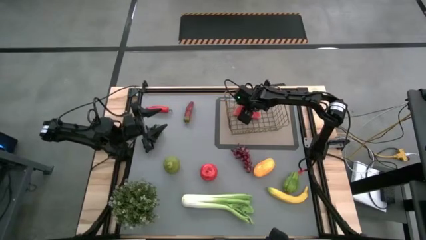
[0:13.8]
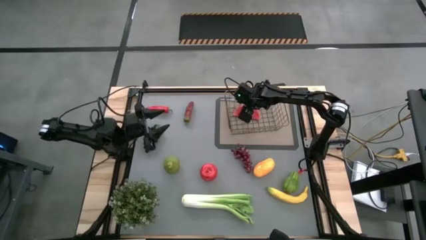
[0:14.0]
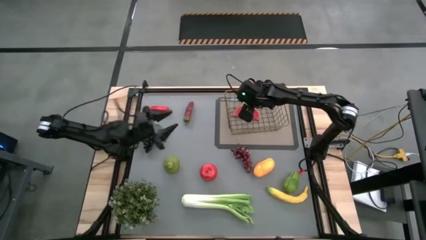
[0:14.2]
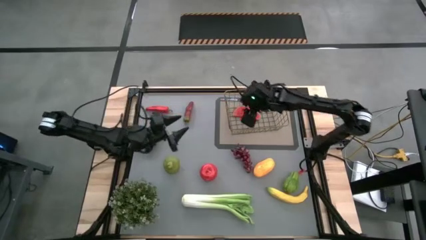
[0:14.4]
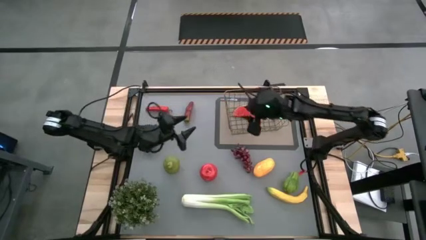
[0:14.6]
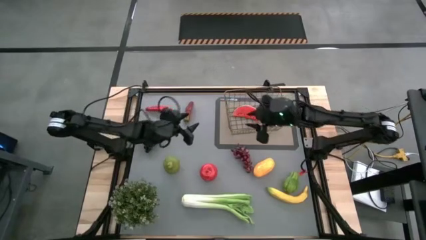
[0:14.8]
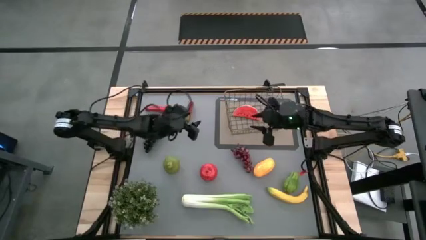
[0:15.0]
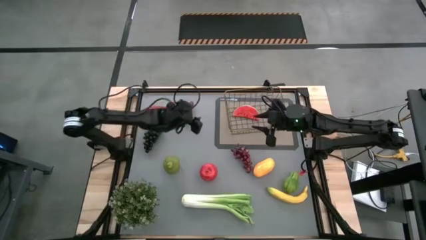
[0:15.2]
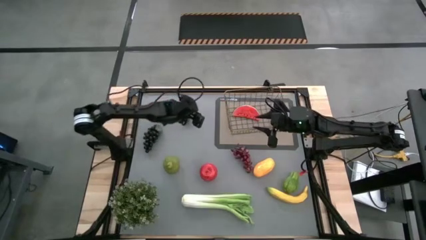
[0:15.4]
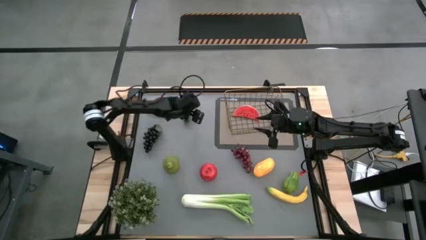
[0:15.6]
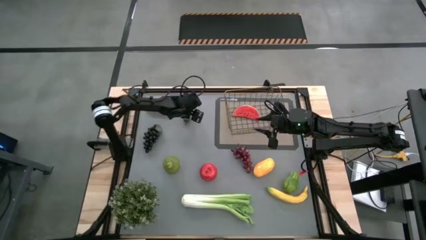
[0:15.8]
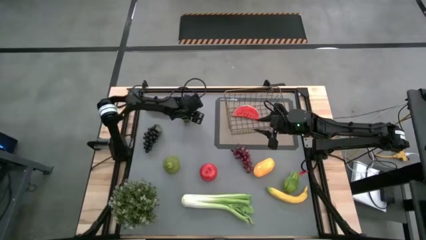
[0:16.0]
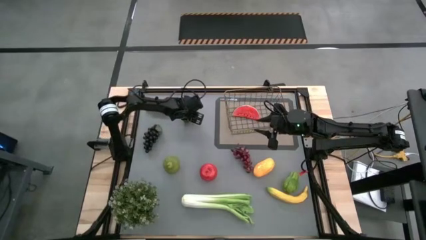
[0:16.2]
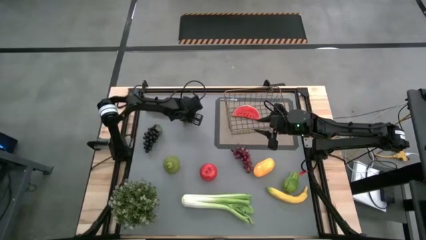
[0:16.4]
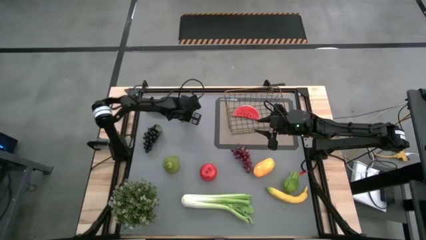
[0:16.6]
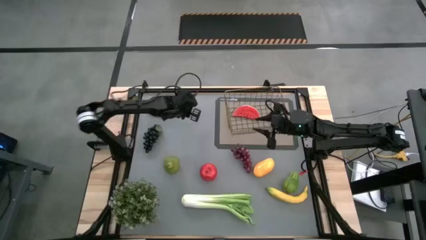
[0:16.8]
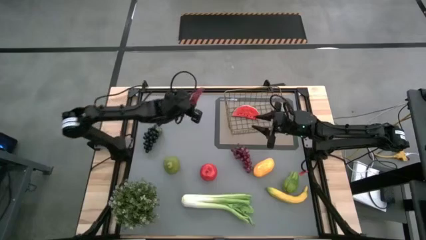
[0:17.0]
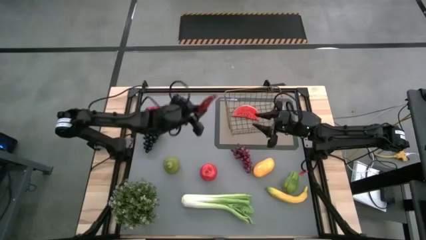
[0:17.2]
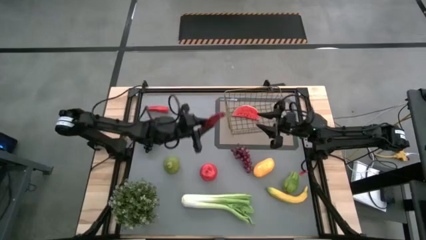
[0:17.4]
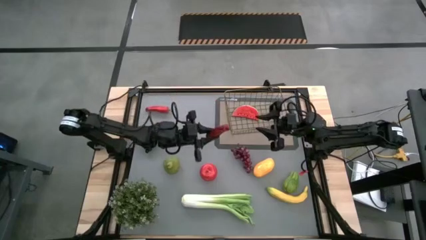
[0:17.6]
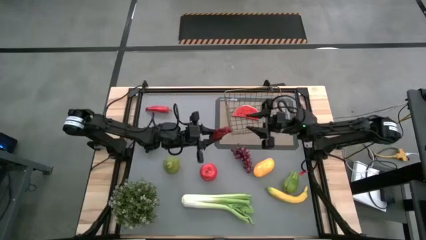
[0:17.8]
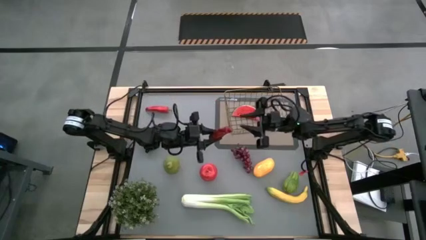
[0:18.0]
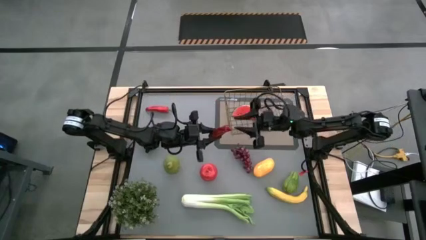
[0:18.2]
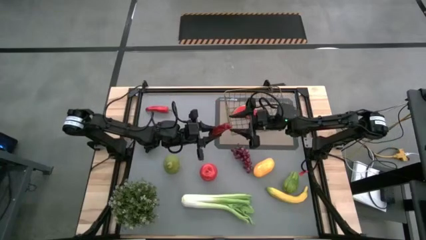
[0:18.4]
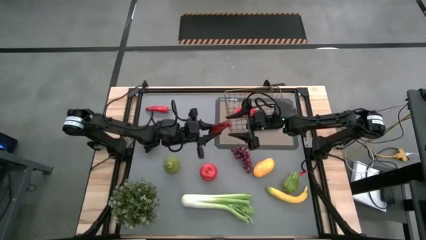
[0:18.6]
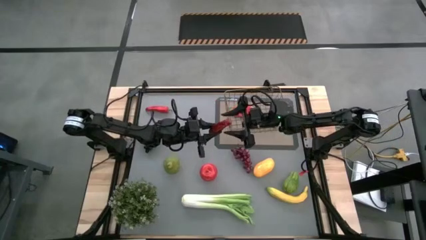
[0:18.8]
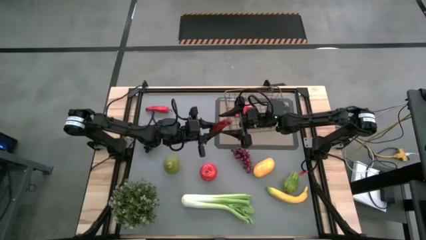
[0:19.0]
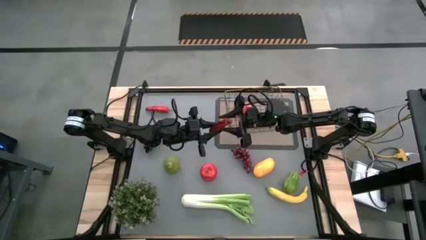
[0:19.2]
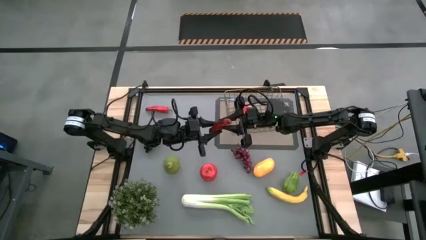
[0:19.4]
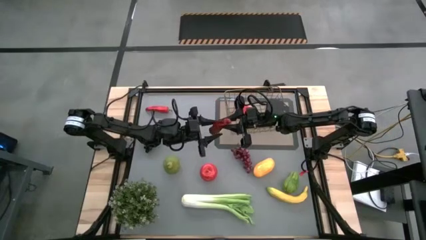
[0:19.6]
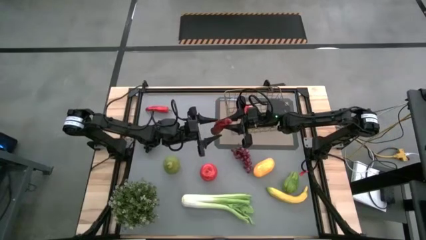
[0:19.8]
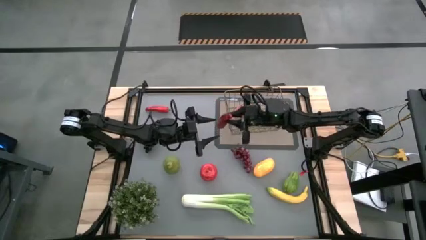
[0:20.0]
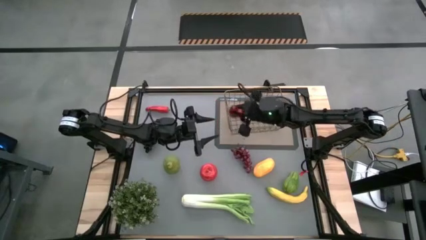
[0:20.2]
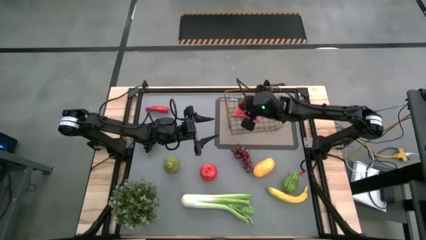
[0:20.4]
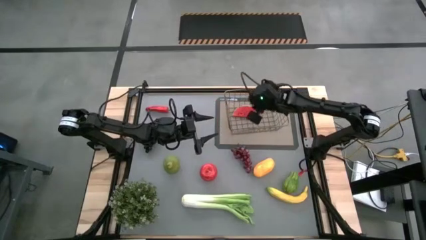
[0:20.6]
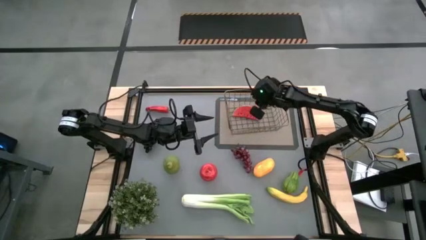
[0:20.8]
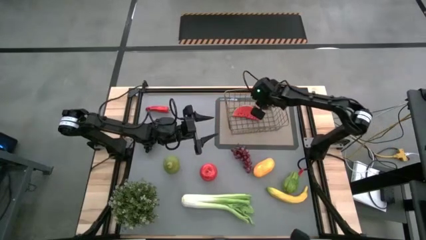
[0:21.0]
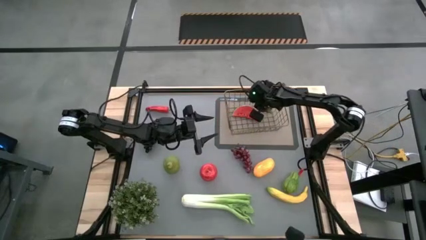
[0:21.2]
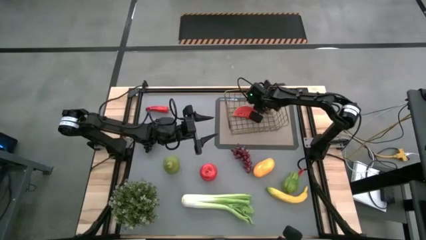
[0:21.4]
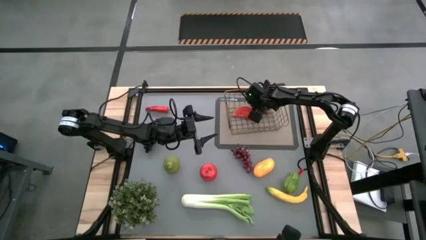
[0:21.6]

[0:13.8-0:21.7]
Task: Build produce basket
Put the right chili pepper into the wire basket

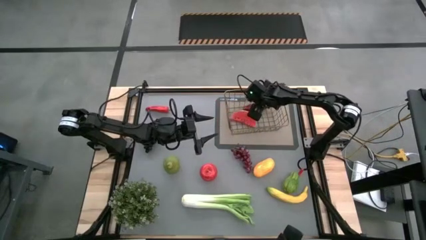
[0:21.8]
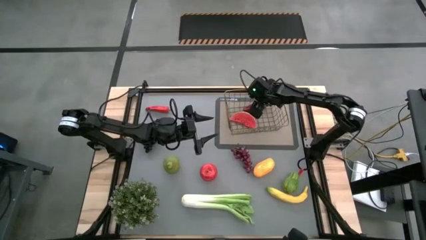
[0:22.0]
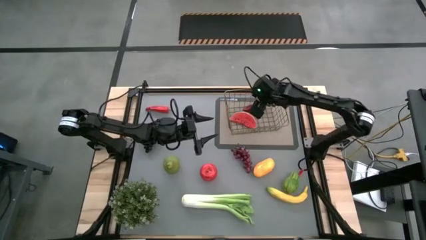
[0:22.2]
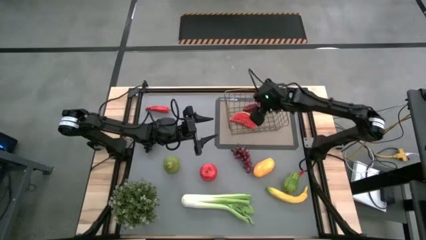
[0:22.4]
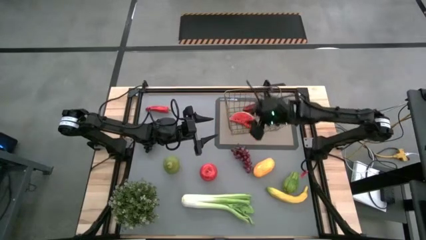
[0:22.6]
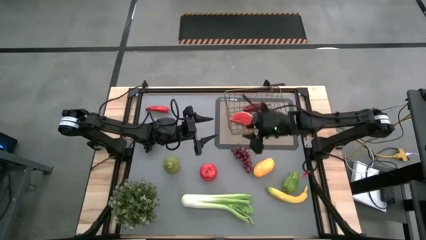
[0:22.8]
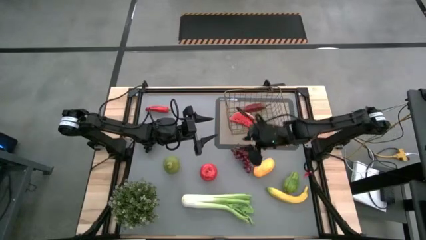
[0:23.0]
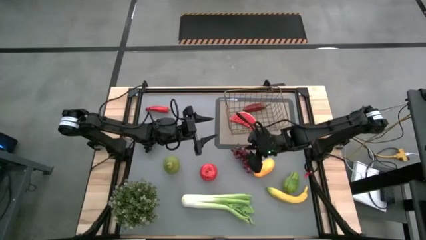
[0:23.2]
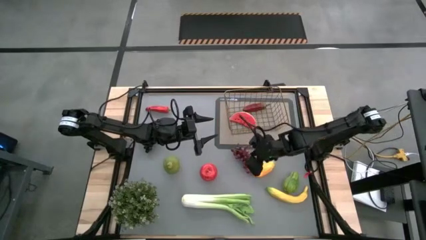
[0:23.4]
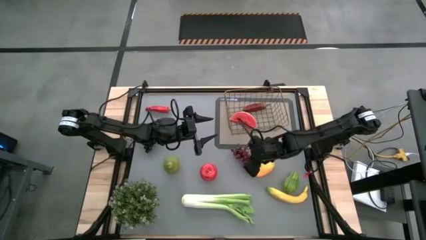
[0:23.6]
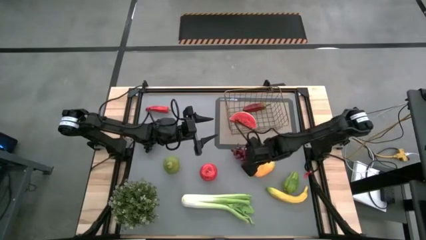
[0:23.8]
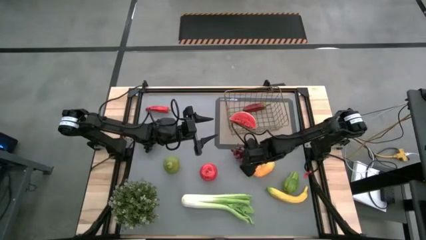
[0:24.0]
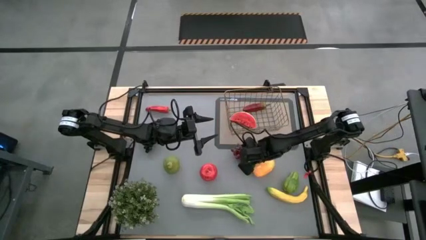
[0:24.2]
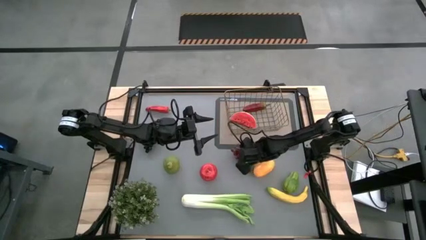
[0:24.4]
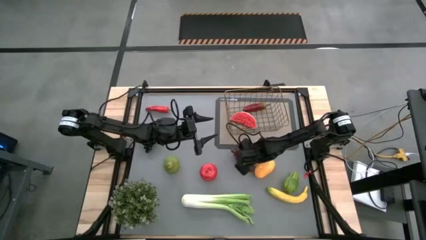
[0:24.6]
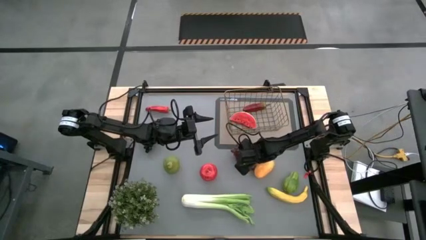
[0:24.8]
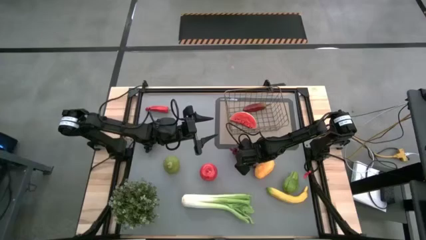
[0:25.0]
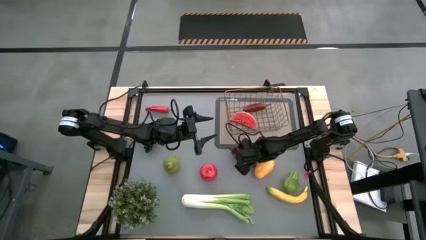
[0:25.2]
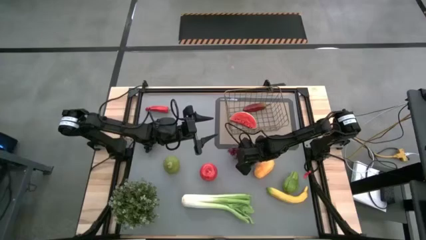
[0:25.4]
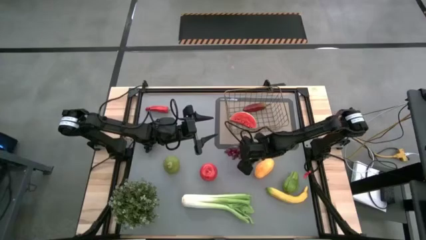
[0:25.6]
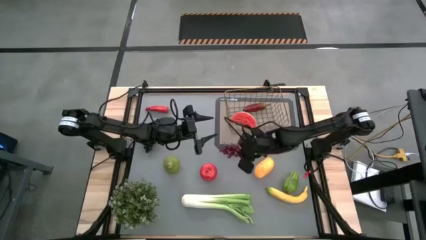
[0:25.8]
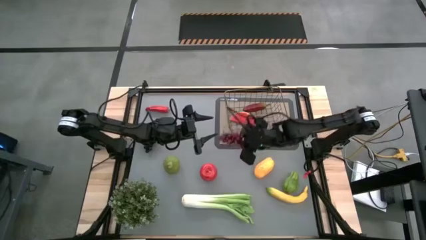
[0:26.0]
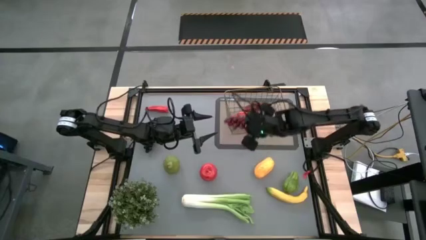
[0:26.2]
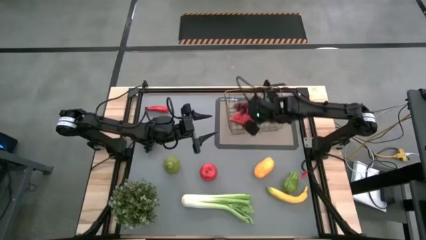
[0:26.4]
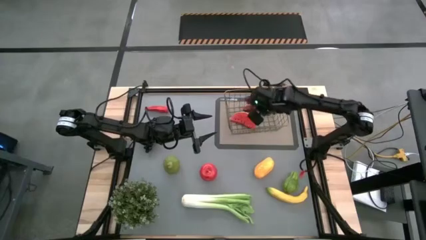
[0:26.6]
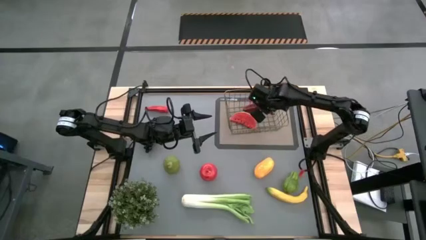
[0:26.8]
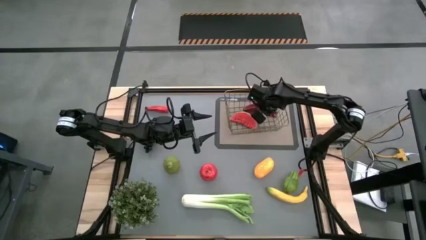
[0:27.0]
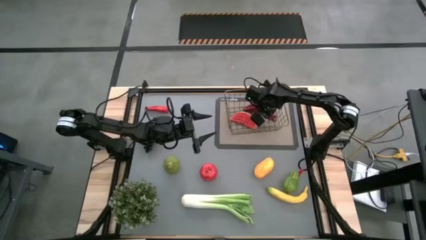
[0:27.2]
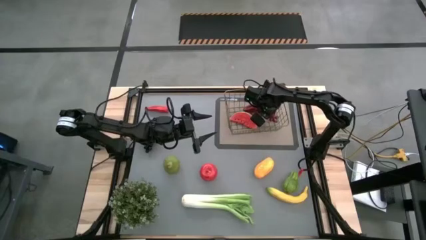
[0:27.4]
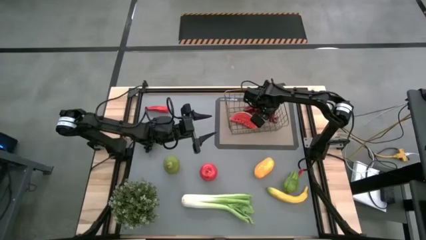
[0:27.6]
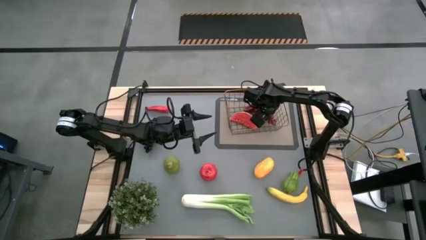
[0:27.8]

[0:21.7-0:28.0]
Put the red grapes into the wire basket

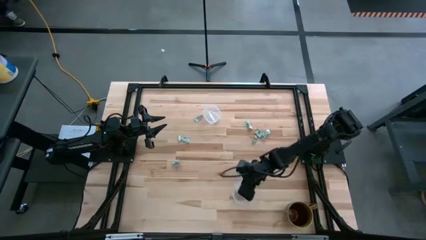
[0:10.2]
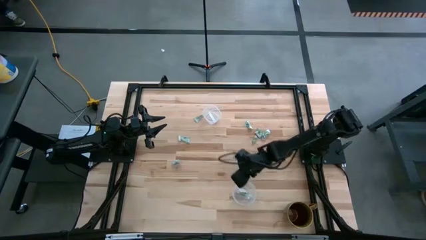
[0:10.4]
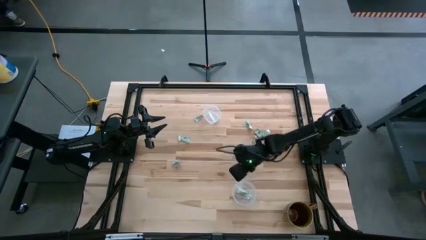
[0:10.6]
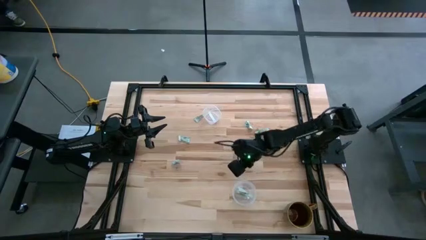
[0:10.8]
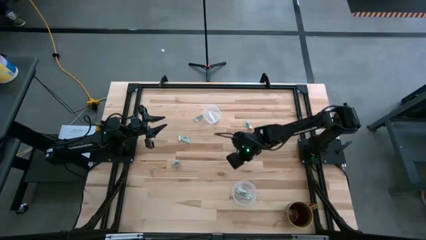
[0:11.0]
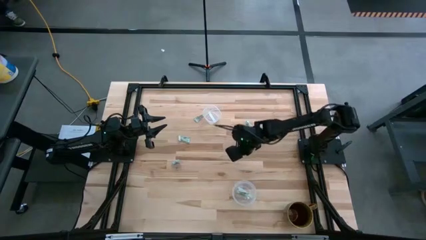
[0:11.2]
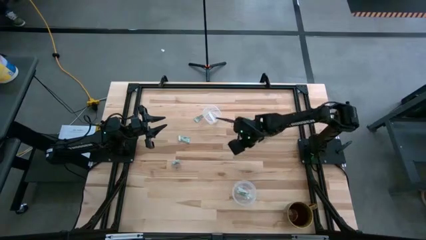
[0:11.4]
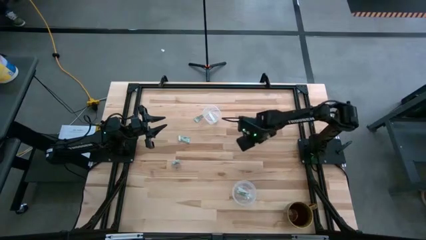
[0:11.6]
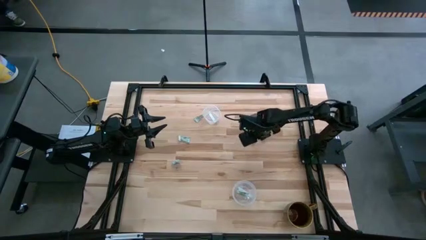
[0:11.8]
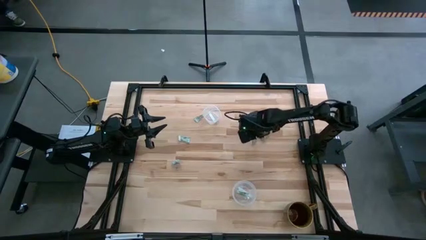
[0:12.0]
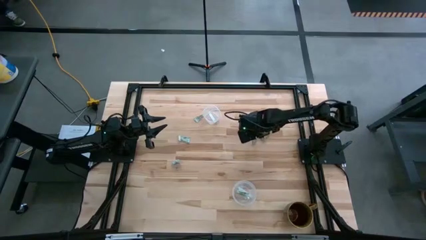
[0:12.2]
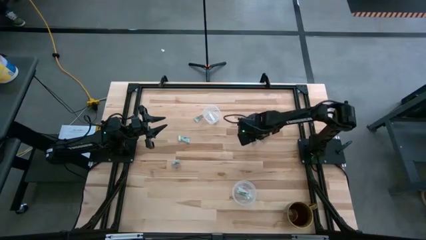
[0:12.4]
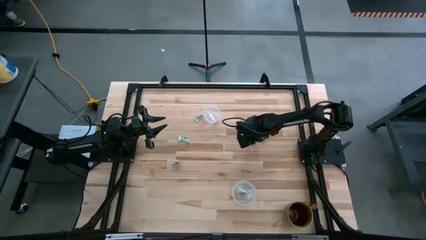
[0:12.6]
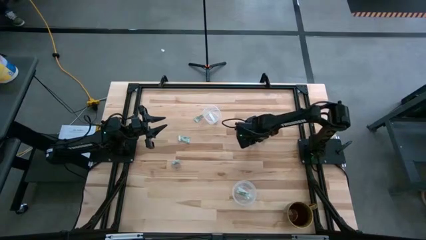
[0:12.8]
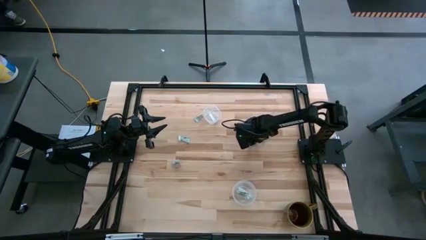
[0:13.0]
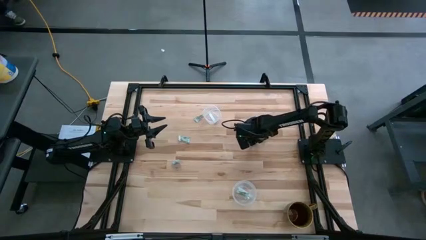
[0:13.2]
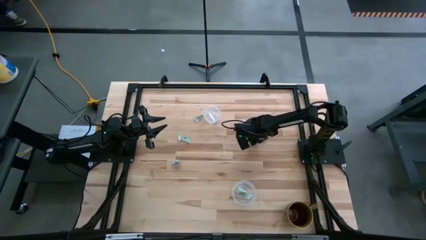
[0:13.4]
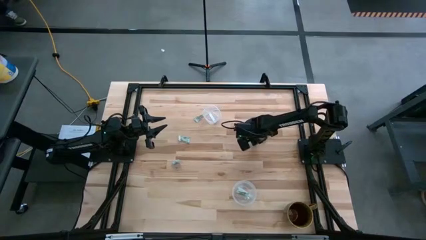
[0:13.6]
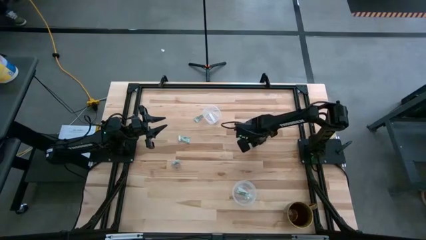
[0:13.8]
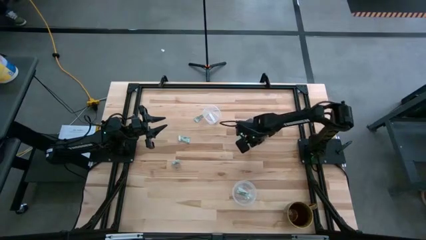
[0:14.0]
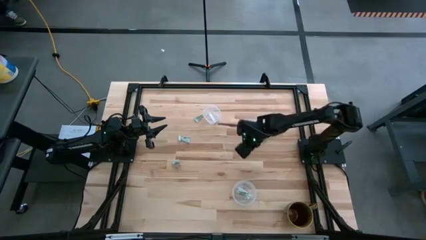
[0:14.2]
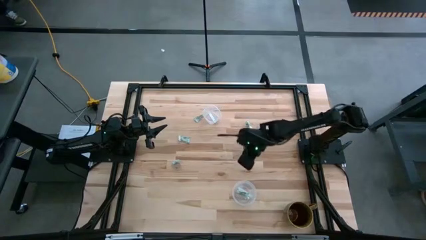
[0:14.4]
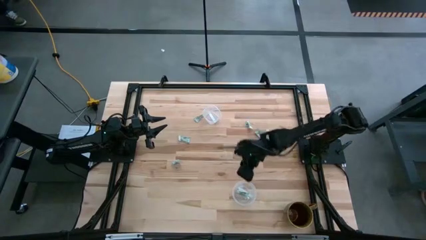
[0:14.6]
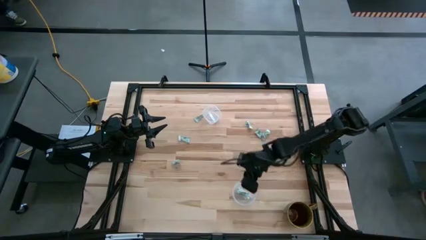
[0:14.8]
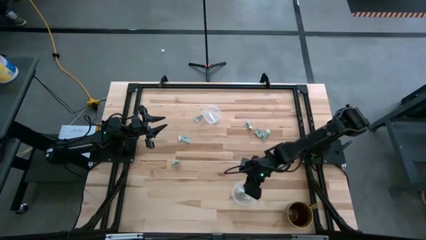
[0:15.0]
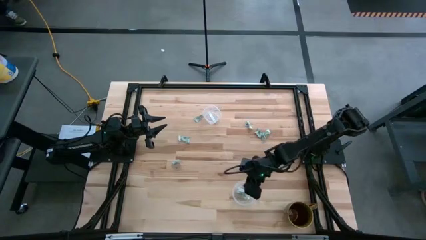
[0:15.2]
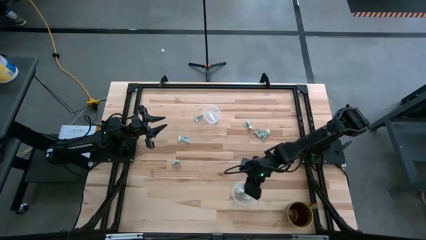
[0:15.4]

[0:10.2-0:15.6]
Task: Pick and place Stevia / Truvia into bins
Put the stevia packet into the bottom transparent container
